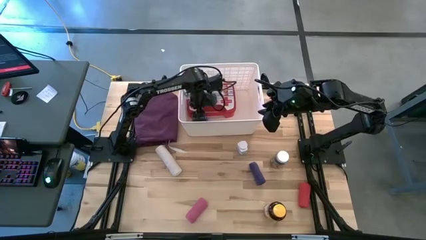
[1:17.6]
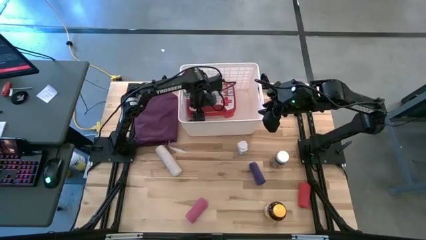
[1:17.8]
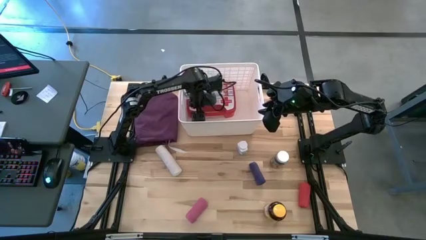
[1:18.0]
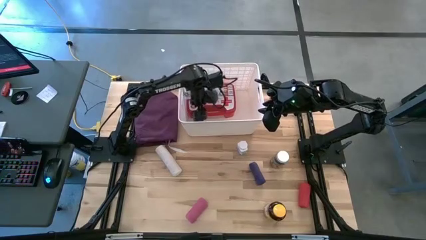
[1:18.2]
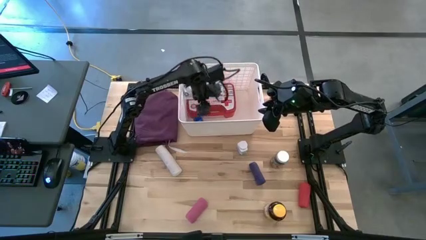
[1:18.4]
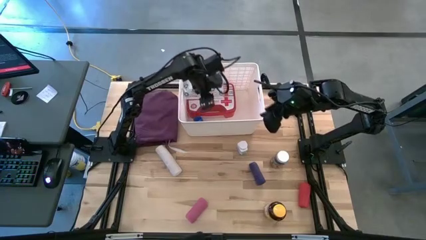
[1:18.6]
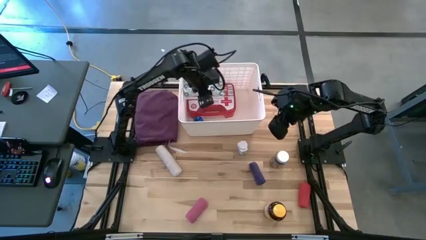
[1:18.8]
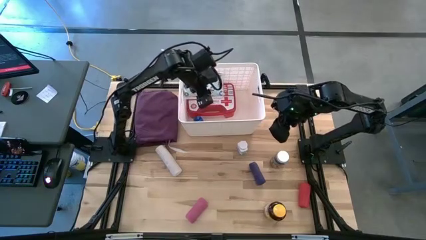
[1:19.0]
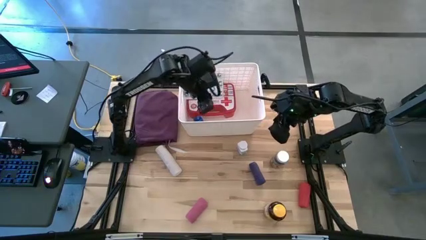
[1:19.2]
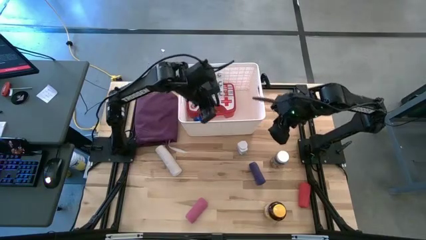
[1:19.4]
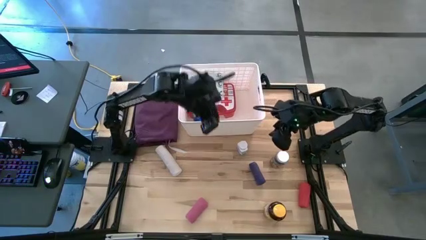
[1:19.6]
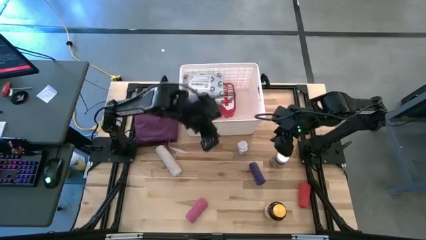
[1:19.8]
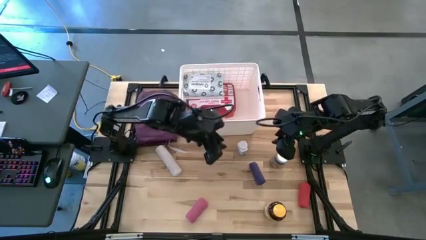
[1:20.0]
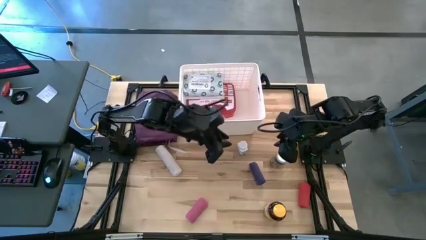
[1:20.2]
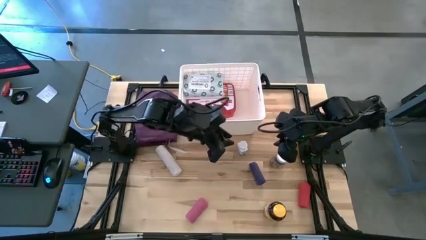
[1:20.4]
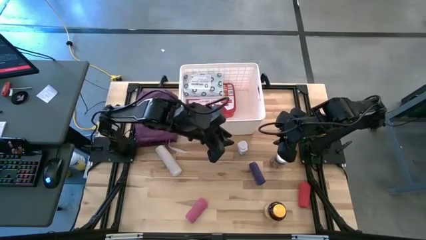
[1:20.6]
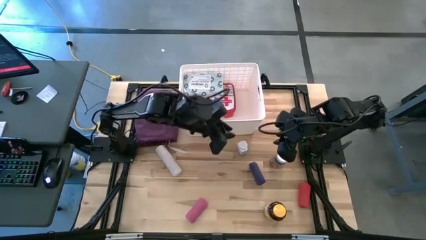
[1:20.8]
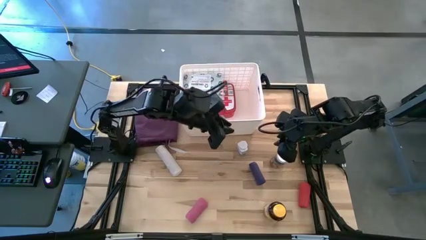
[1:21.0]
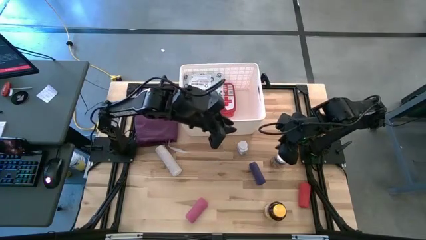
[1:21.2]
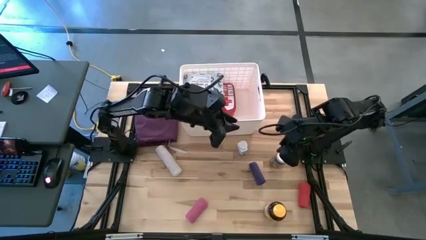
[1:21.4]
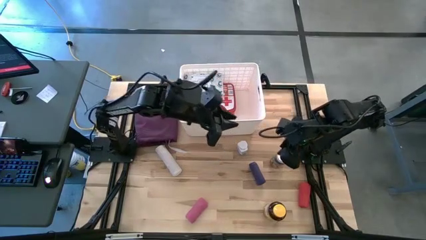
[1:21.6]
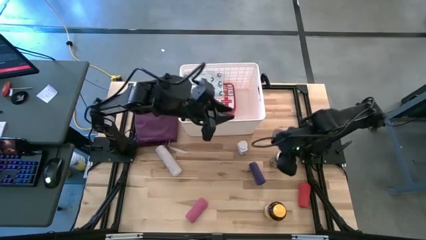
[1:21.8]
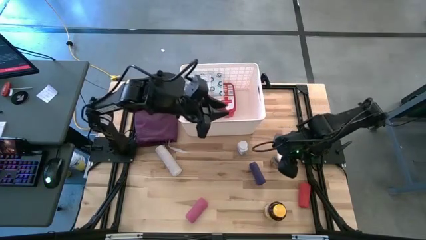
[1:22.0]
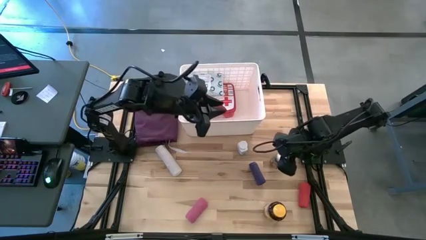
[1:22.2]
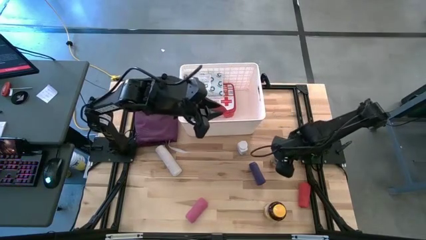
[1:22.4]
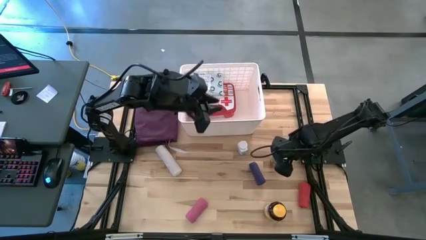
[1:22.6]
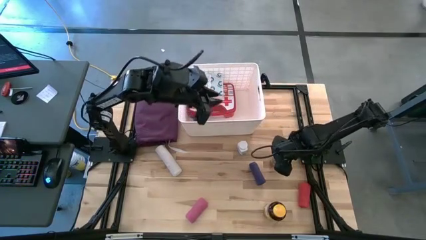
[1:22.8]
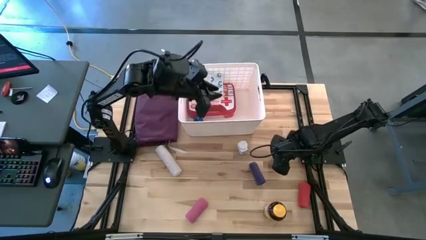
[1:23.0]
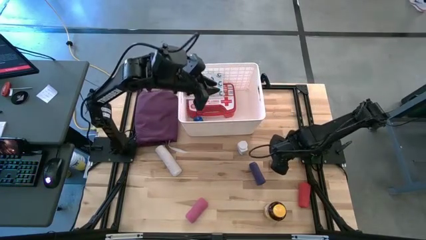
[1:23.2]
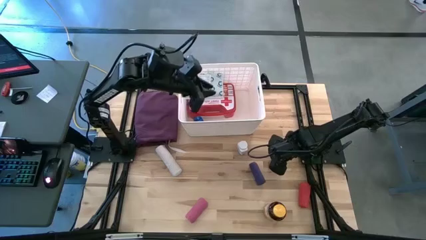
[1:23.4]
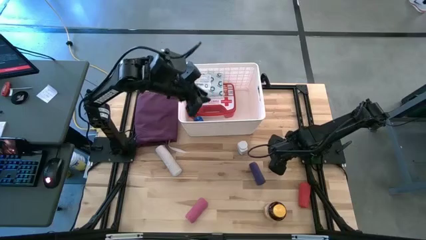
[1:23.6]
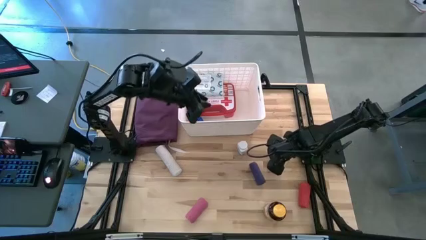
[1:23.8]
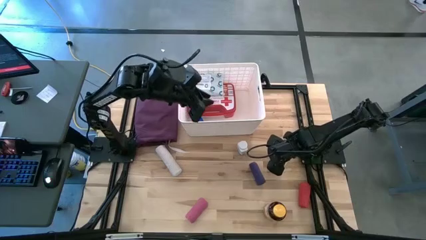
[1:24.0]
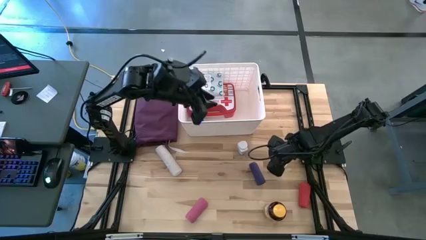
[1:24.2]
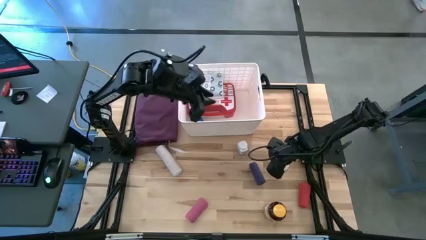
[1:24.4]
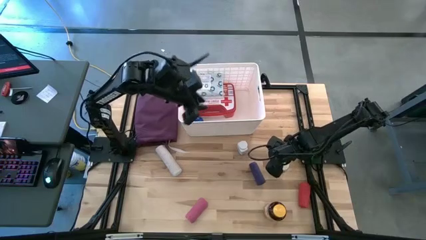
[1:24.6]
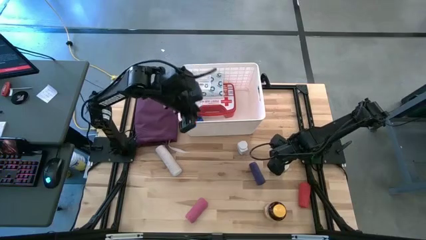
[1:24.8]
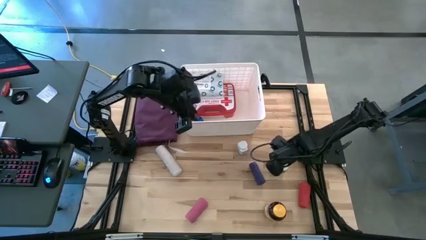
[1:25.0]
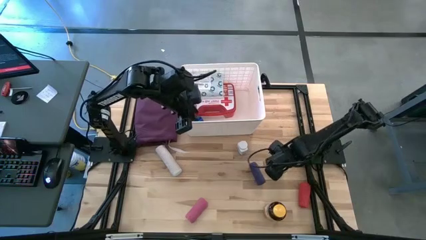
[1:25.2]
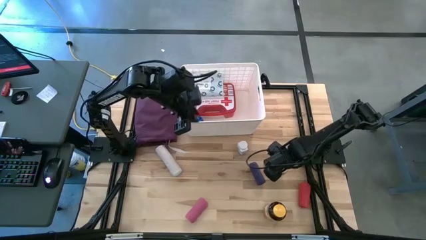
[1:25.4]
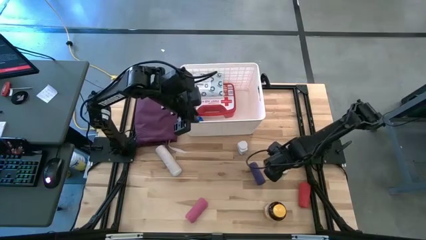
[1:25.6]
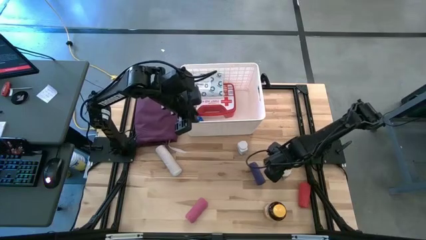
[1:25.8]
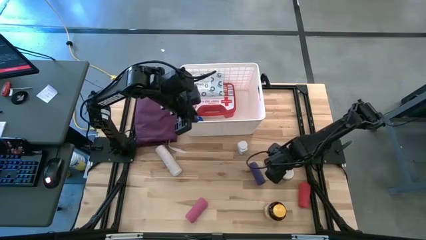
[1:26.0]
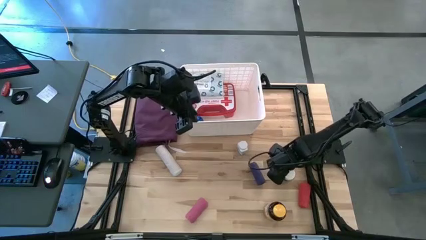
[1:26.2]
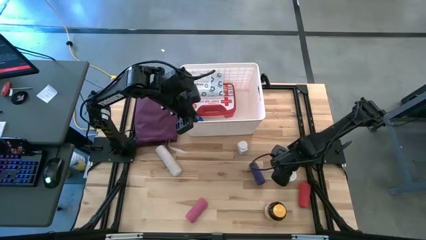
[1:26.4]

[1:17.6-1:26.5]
Task: Pick & place medical supplies in basket/bin
Put the green pill bottle into the white bin

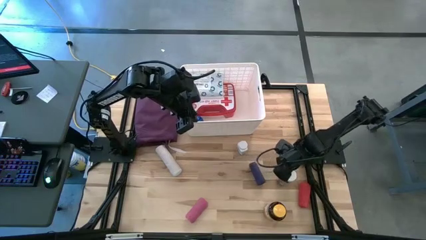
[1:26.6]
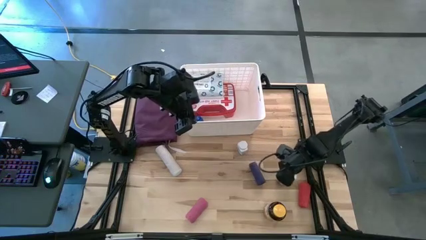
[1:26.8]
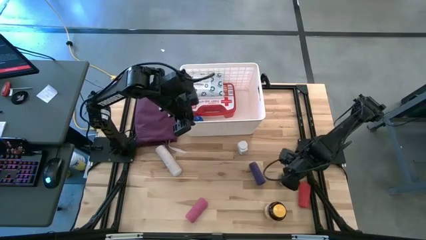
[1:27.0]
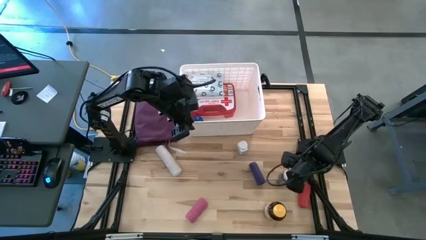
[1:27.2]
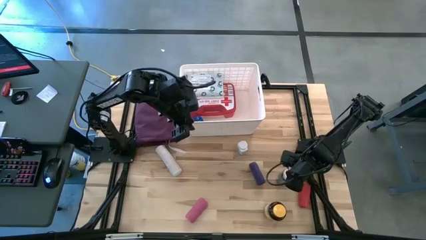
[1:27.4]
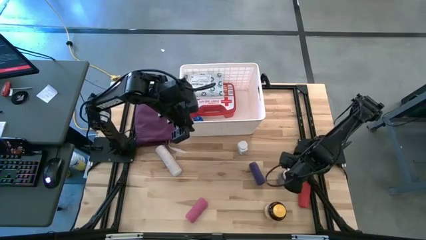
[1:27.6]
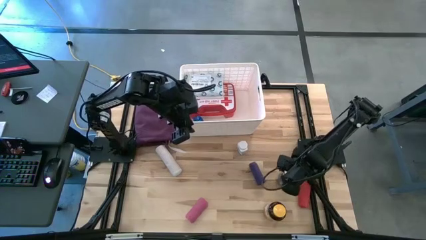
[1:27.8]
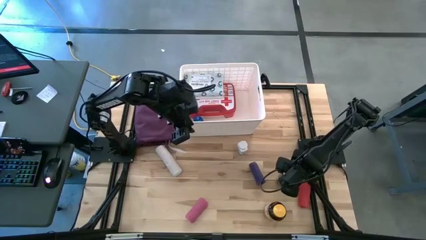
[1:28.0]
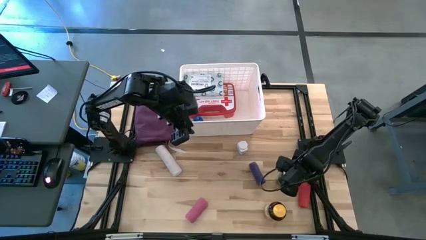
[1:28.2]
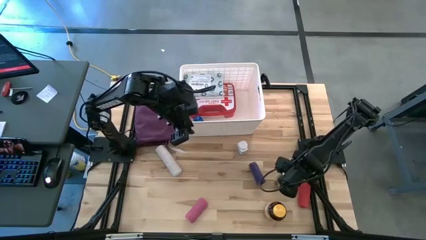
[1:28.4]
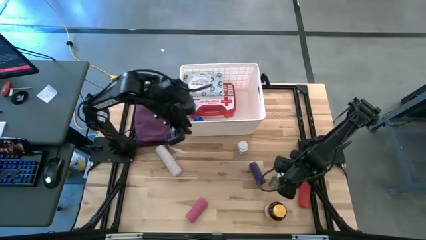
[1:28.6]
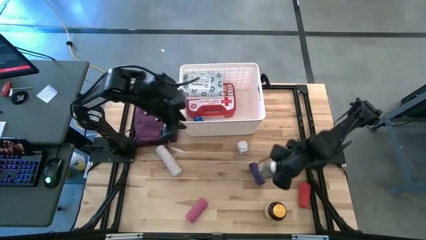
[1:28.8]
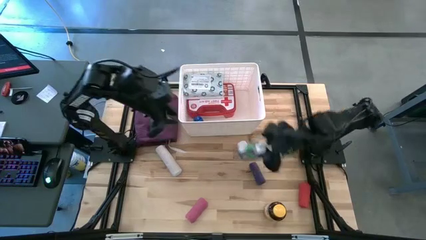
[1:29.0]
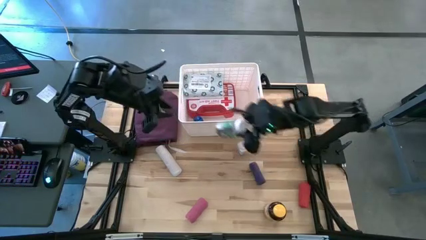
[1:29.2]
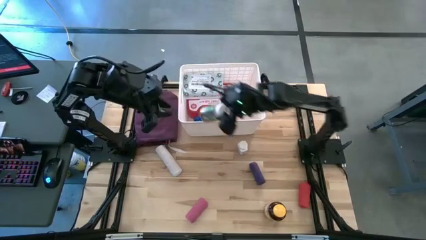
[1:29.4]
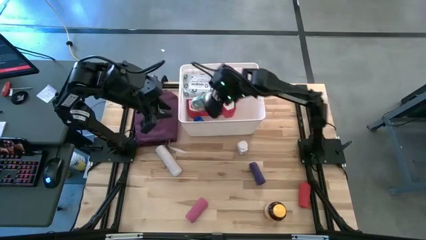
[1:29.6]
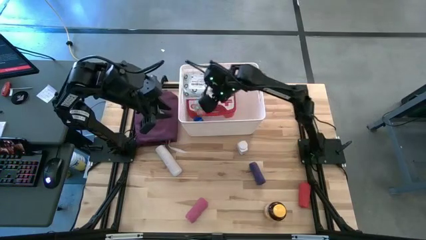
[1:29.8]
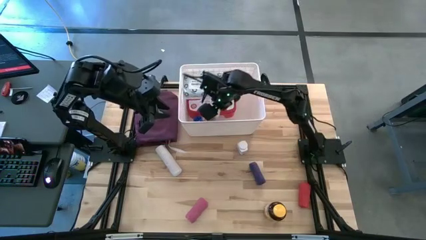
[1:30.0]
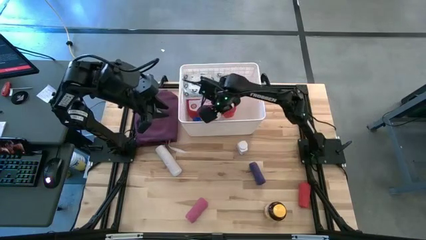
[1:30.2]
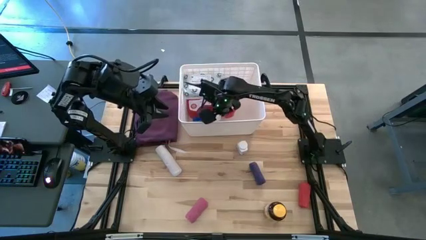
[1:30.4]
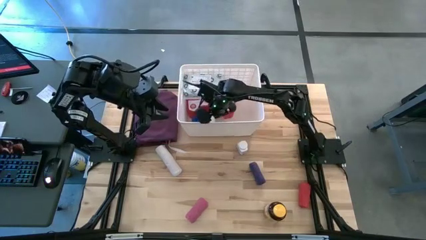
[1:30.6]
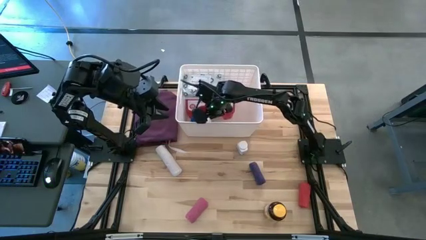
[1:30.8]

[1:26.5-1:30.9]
Put the green pill bottle into the white bin

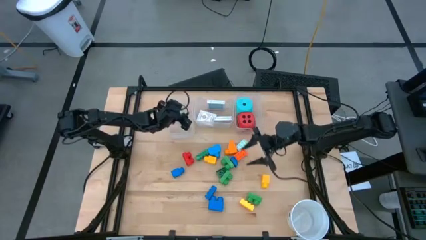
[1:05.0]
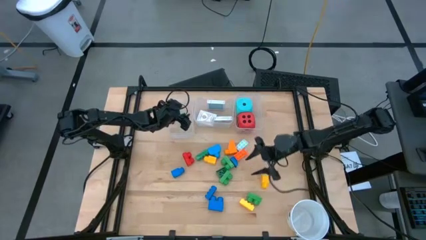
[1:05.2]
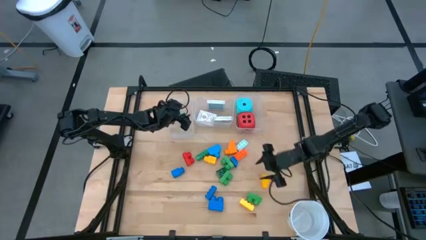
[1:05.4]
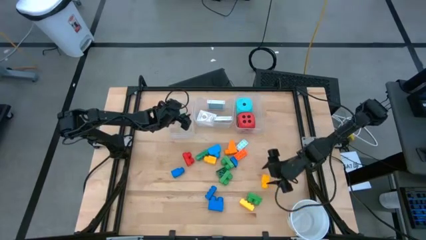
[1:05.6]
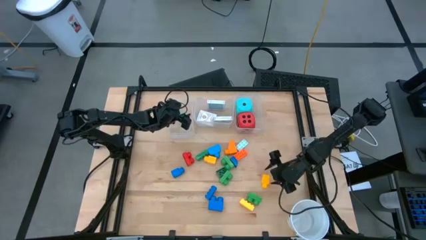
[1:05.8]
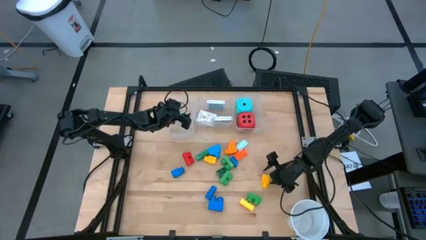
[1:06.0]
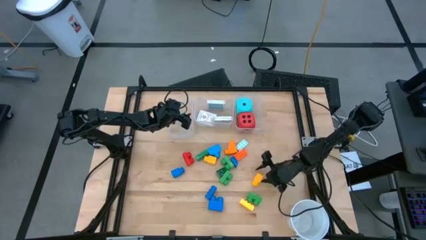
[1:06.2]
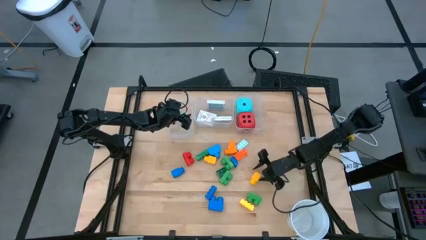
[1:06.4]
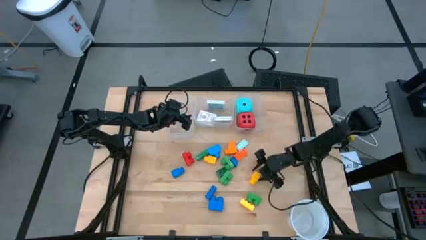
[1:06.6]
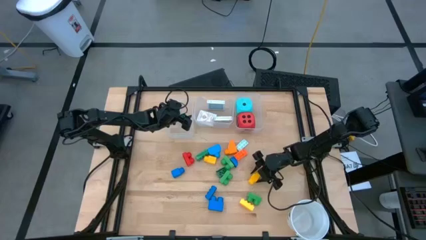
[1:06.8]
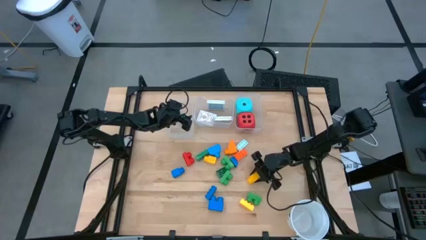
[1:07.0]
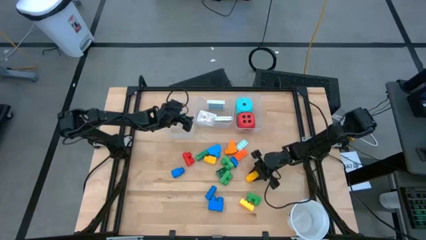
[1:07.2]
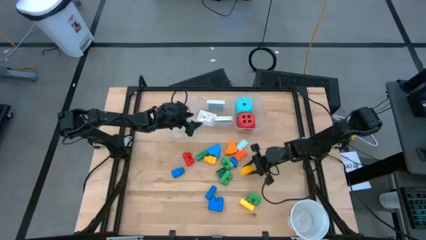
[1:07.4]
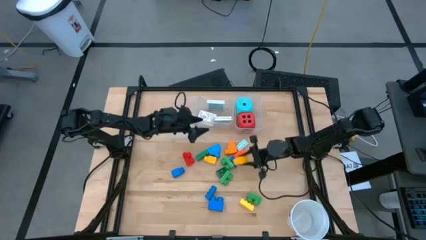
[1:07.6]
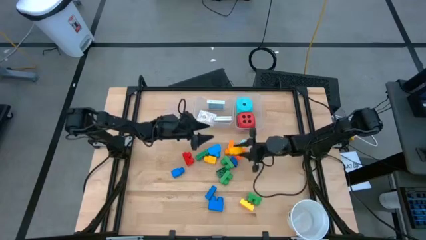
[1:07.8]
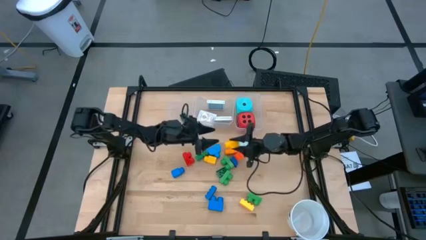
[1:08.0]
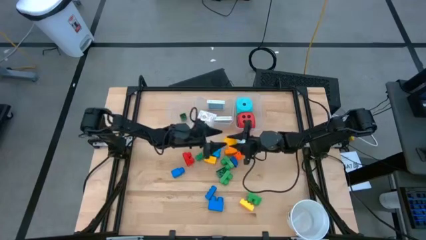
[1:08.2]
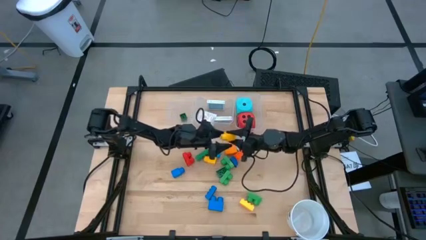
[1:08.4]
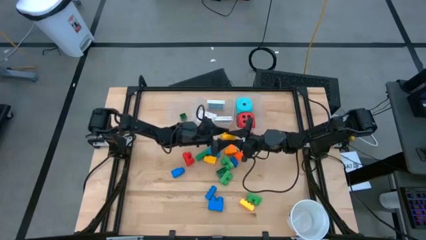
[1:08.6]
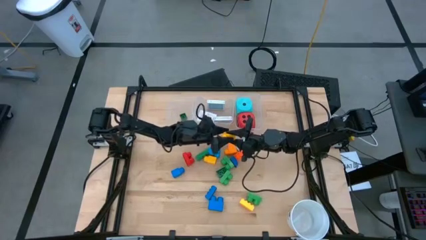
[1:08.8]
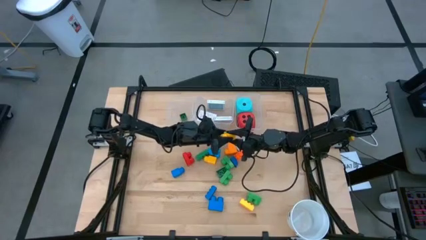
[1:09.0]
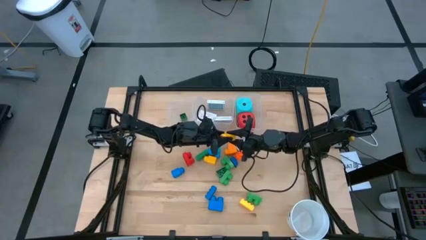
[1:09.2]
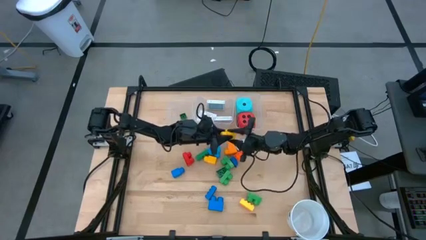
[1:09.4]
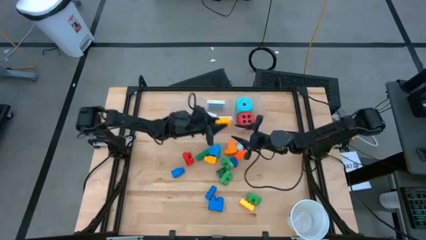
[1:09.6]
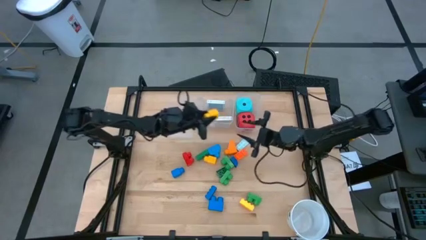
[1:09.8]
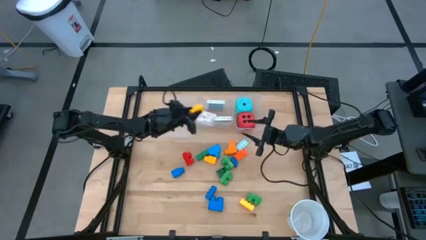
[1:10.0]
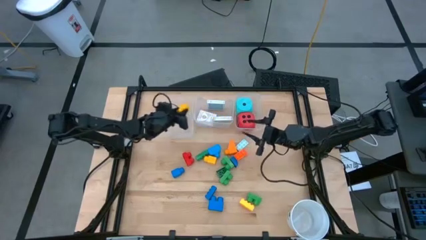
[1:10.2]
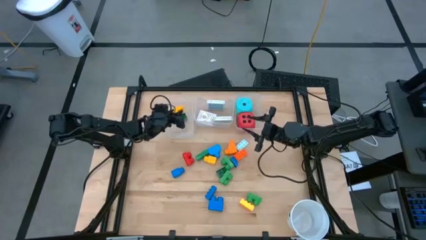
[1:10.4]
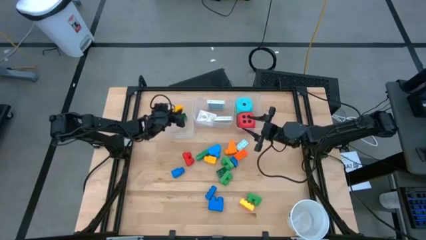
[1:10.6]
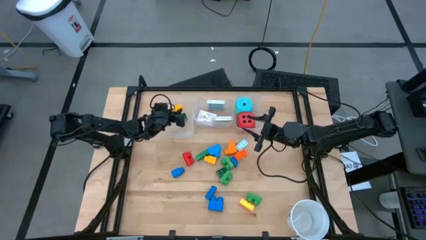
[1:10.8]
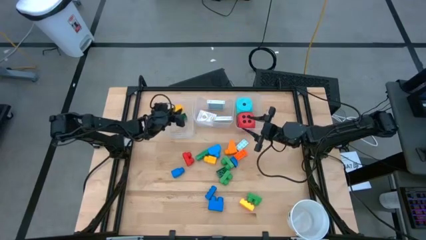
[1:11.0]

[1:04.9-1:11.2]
Task: Pick & Place Toys
Put the yellow game piece into the left transparent bin
